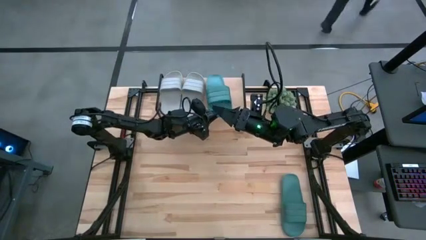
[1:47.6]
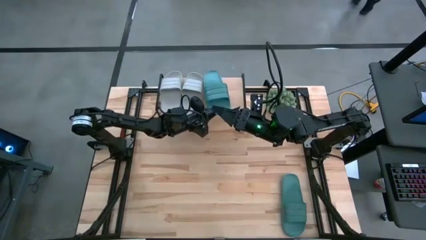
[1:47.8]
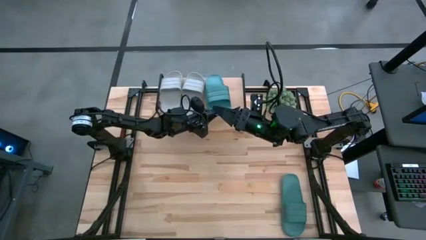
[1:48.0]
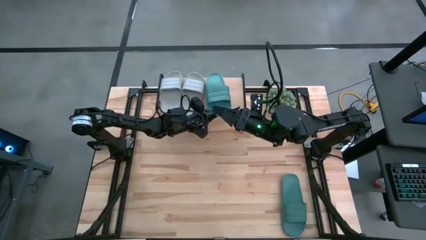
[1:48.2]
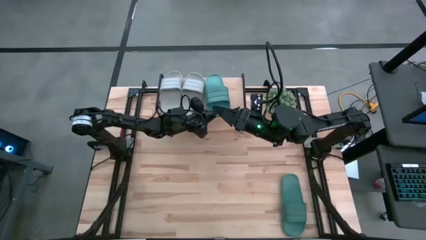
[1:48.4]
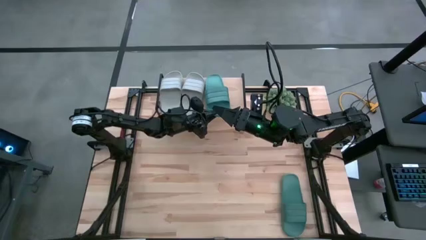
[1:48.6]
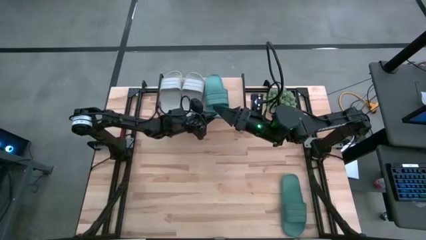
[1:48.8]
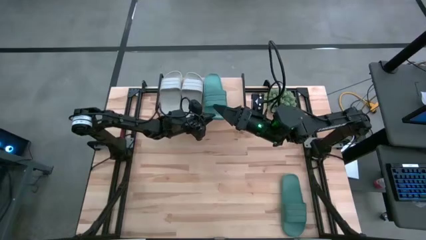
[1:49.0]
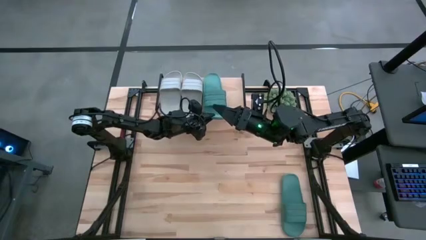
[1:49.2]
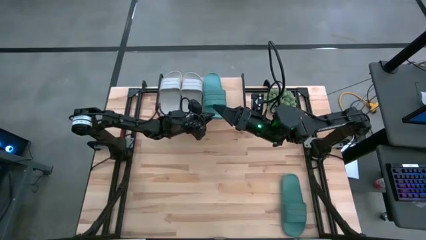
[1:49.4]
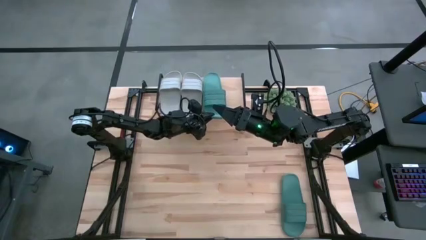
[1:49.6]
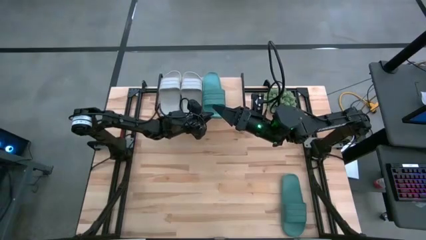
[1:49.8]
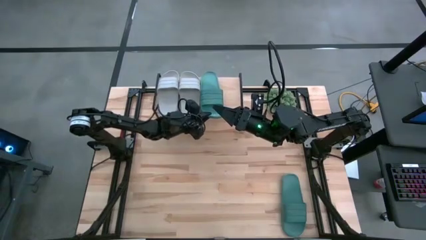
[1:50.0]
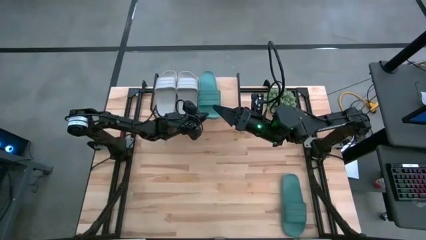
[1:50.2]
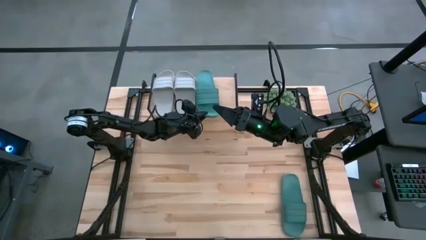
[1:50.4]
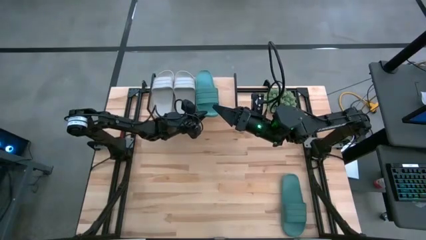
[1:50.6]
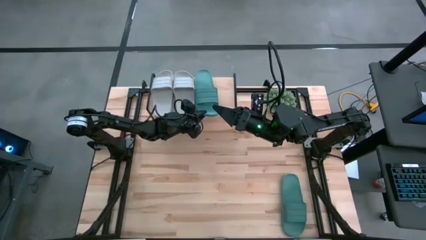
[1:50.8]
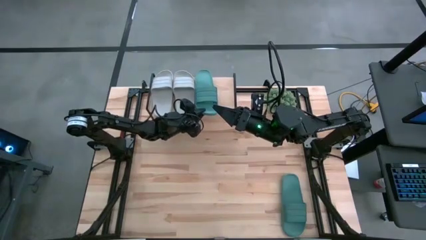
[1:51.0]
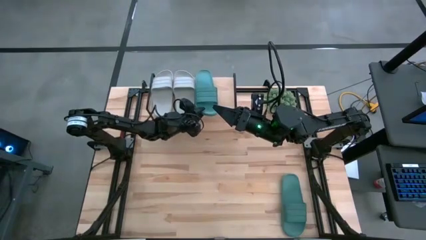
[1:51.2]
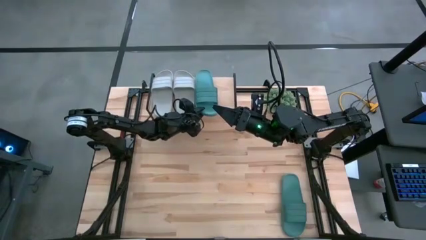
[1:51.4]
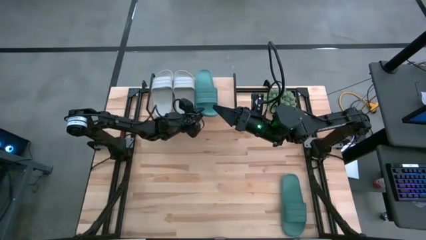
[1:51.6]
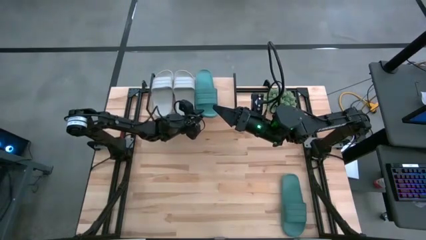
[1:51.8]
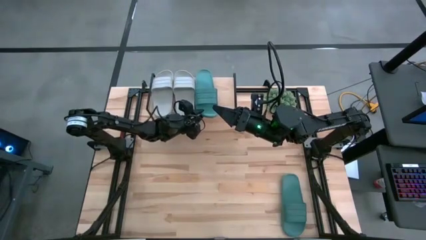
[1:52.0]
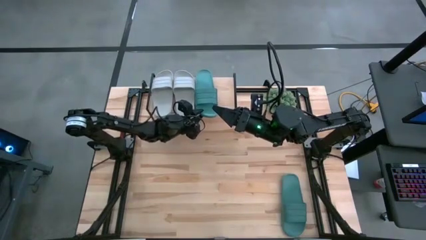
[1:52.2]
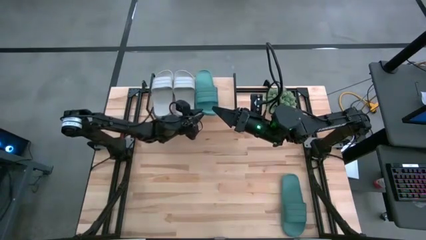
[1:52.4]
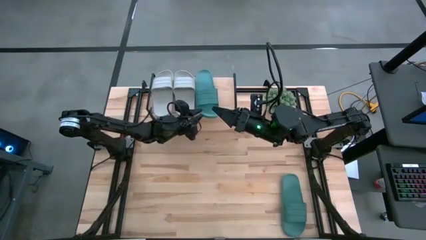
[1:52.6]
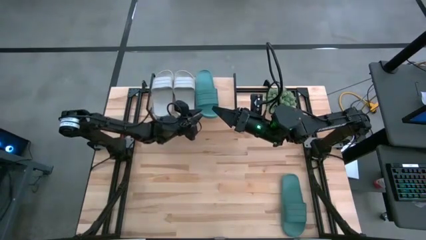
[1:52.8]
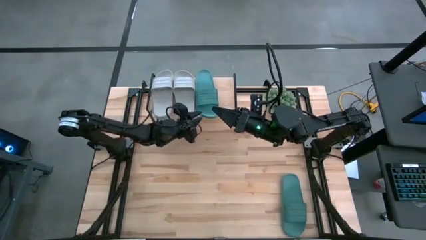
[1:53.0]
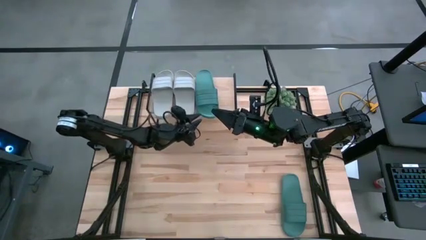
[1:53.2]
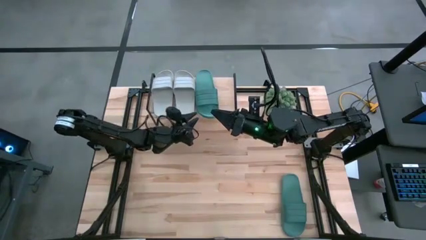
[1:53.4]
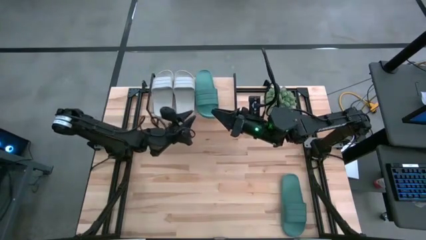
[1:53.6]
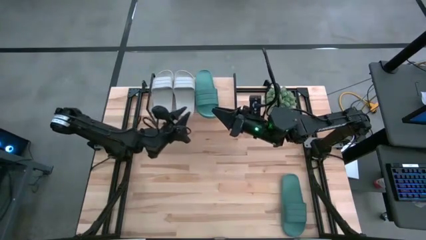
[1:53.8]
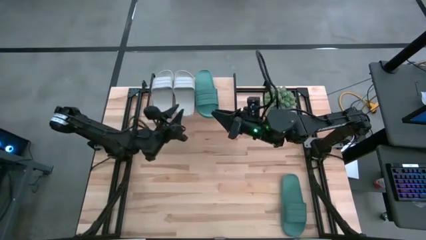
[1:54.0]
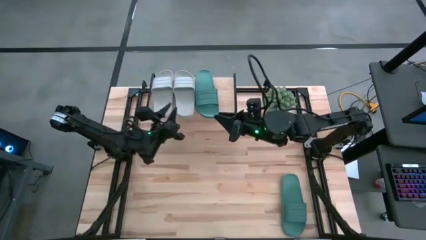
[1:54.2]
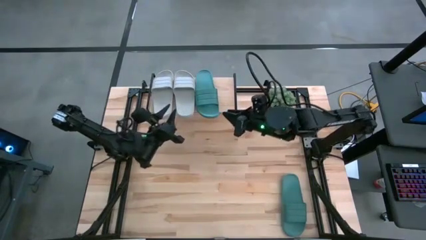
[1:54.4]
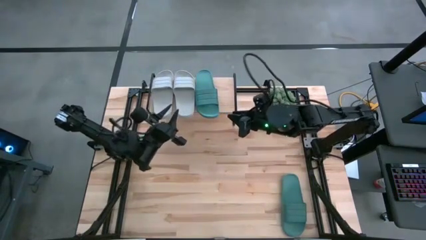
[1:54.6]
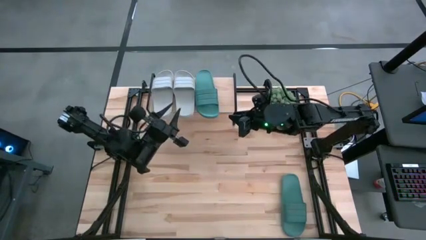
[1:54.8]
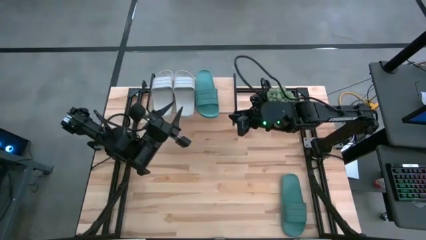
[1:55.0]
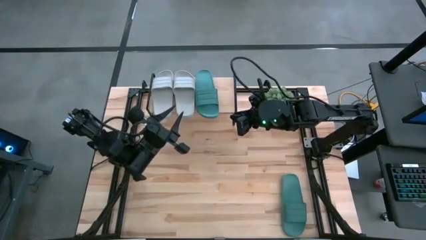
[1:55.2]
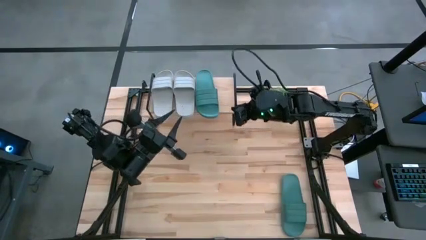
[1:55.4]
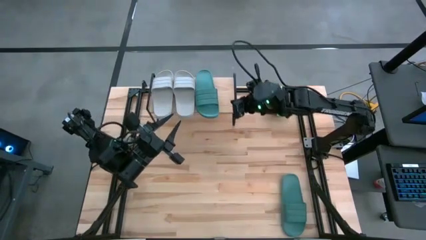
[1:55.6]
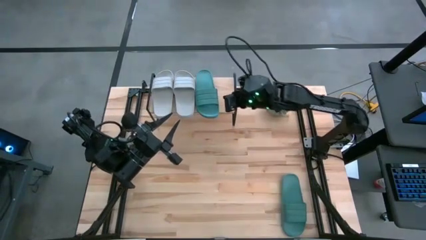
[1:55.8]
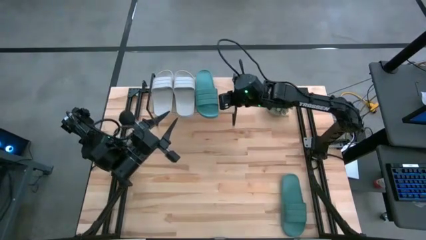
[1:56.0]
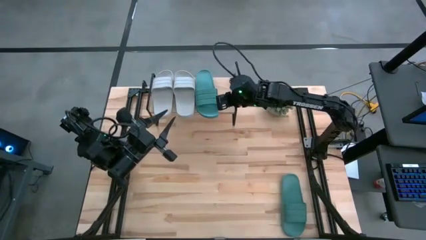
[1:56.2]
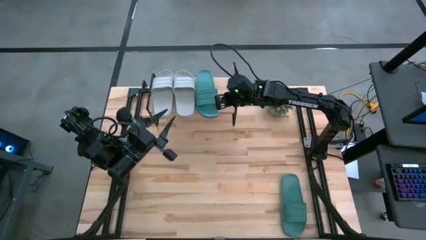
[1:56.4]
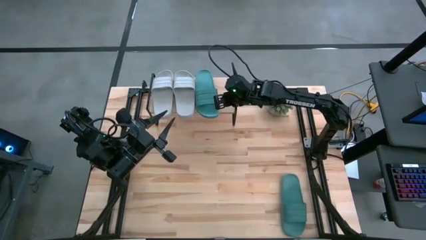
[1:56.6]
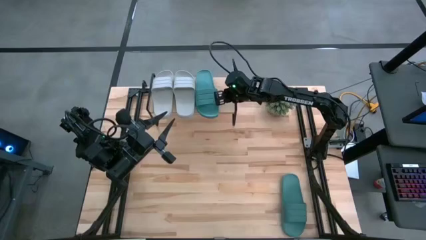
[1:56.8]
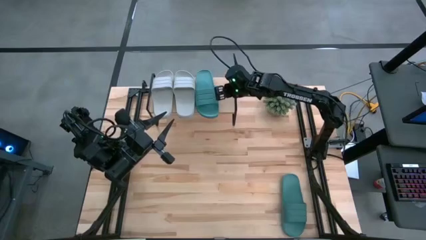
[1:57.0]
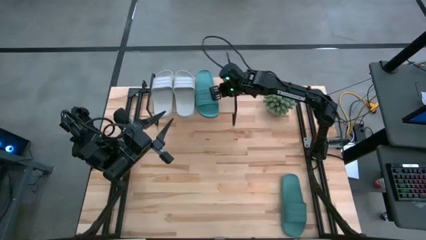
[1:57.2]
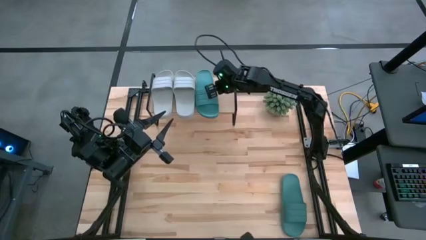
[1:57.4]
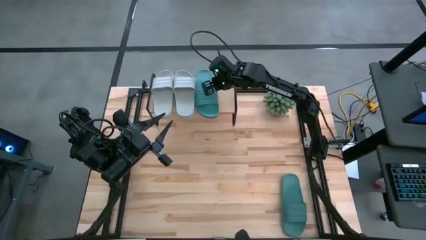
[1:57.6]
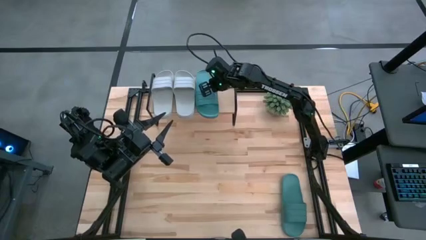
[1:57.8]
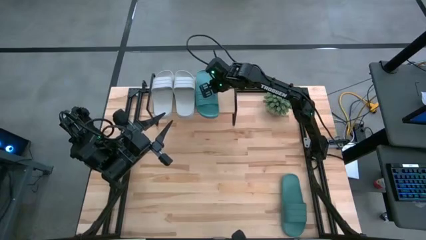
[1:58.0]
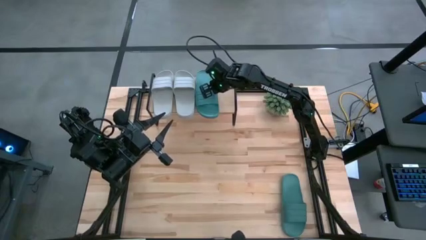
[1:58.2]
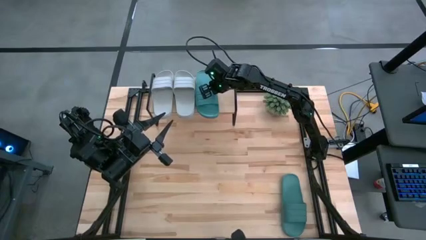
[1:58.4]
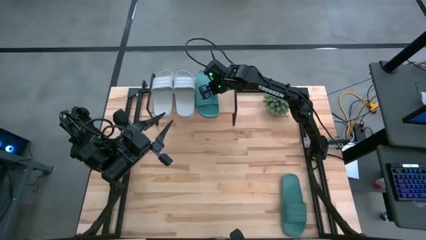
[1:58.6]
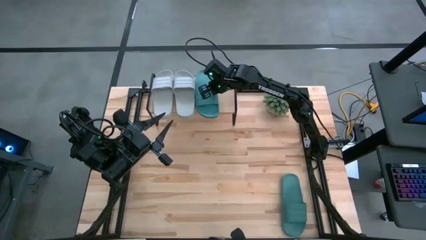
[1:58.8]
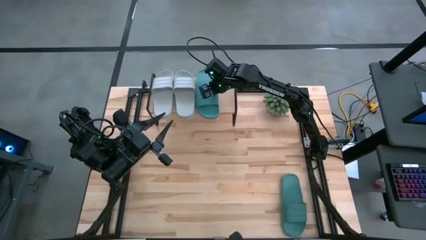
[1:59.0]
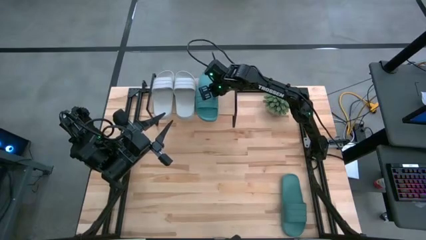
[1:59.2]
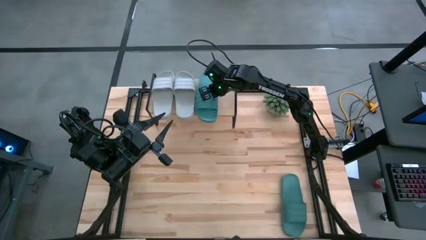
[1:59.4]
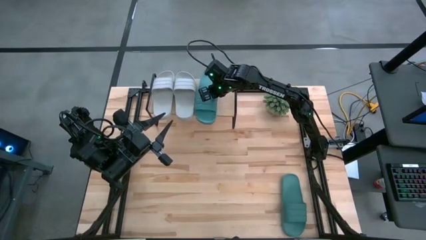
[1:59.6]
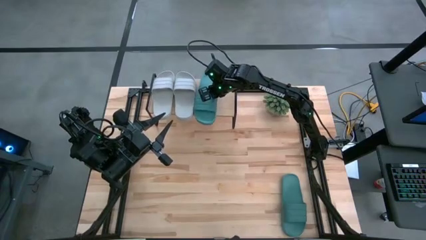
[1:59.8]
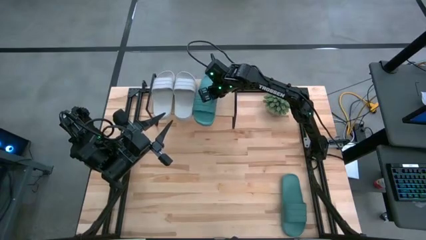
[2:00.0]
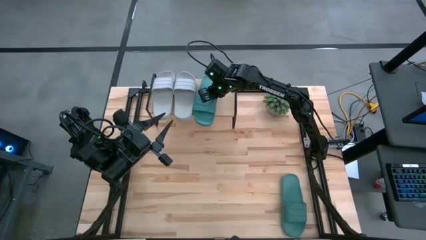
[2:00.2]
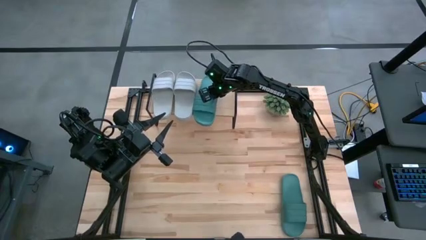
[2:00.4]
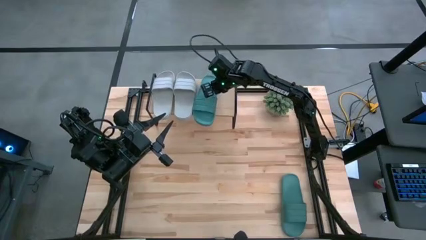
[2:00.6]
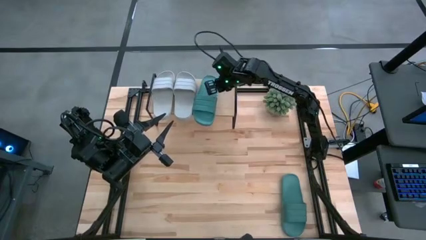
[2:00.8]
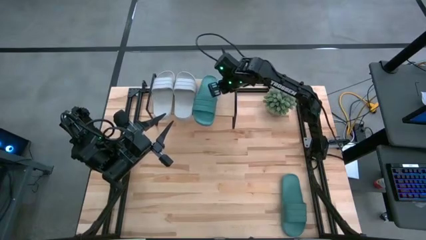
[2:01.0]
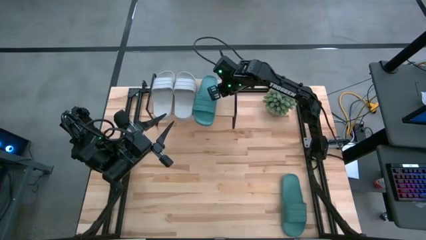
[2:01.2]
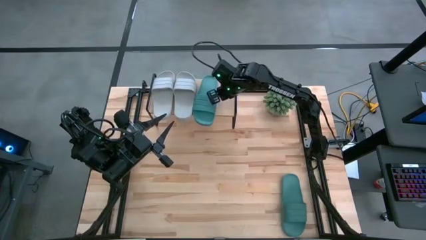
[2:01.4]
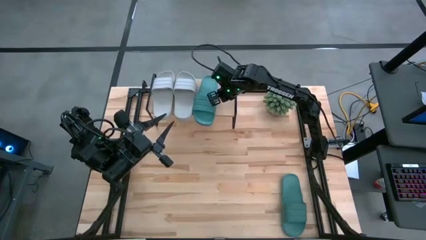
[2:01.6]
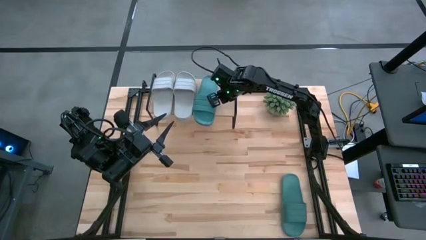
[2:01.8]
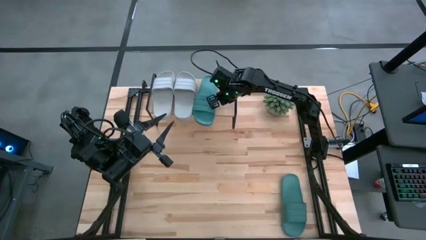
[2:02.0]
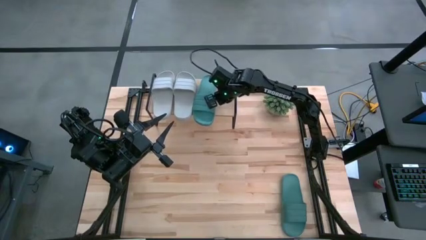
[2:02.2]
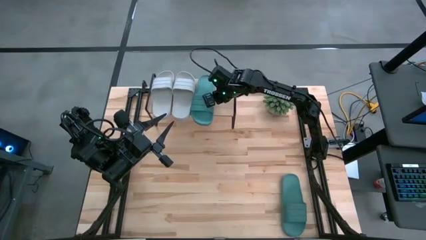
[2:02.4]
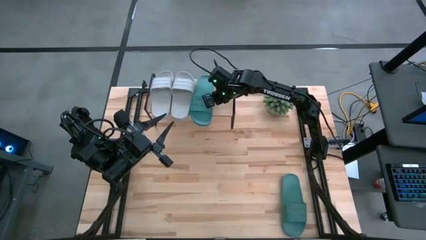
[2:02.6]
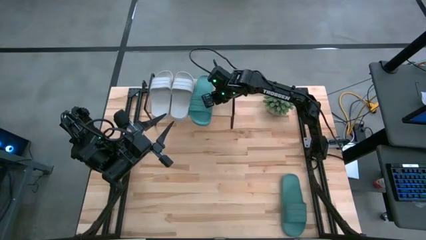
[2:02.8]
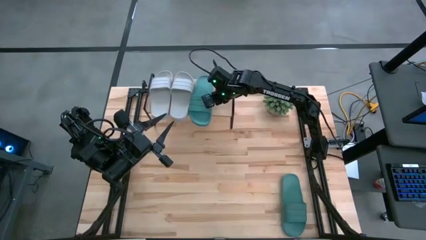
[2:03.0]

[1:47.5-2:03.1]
Task: Pick and place slides into the shelf
Put the left green slipper on the shelf
